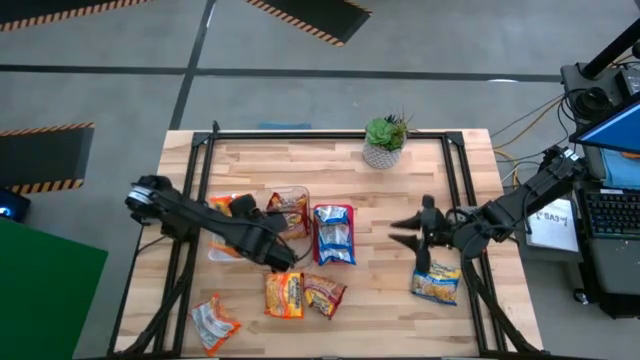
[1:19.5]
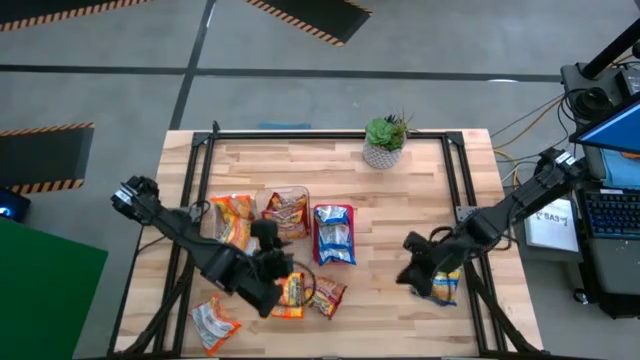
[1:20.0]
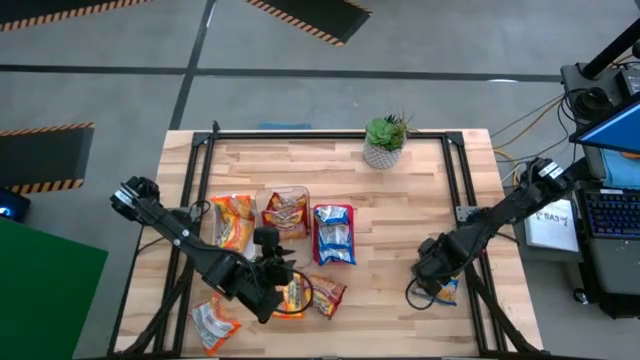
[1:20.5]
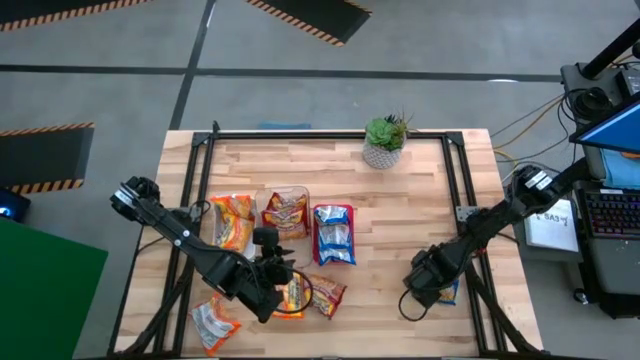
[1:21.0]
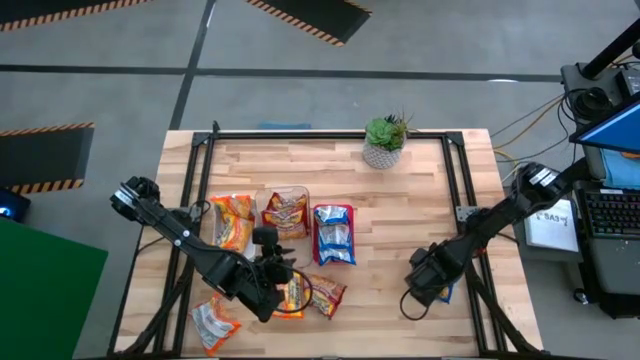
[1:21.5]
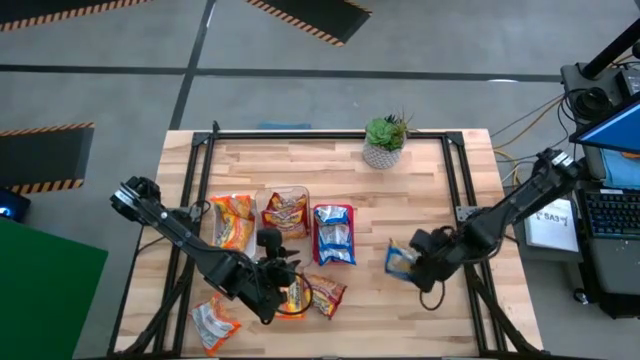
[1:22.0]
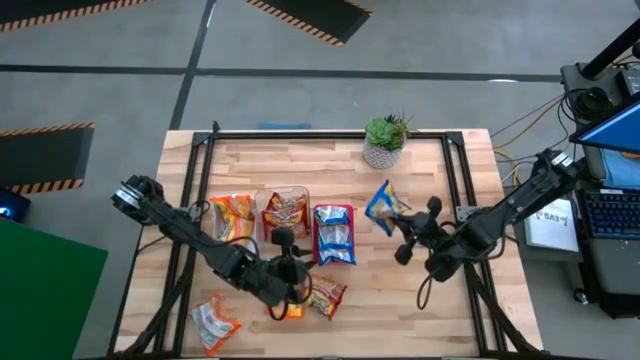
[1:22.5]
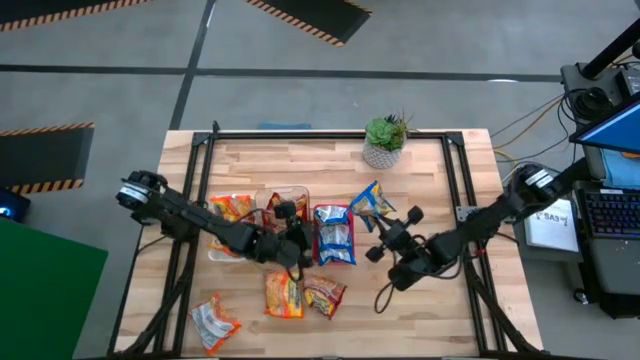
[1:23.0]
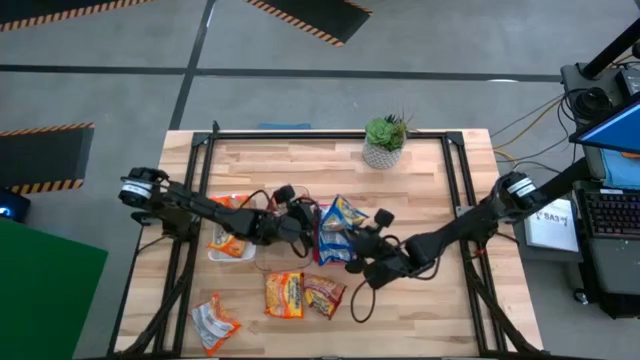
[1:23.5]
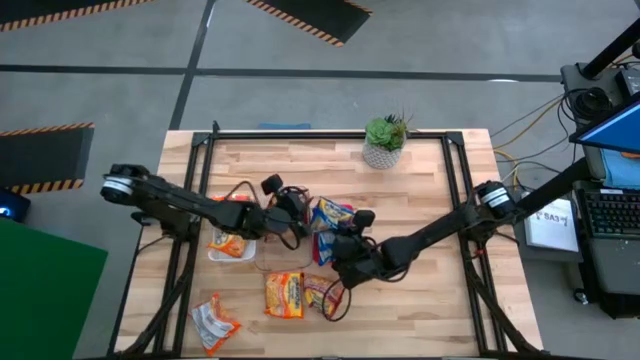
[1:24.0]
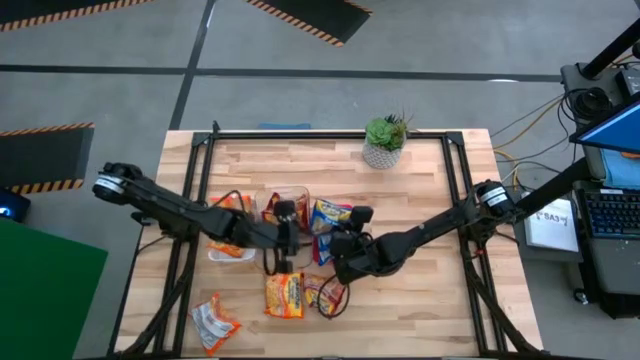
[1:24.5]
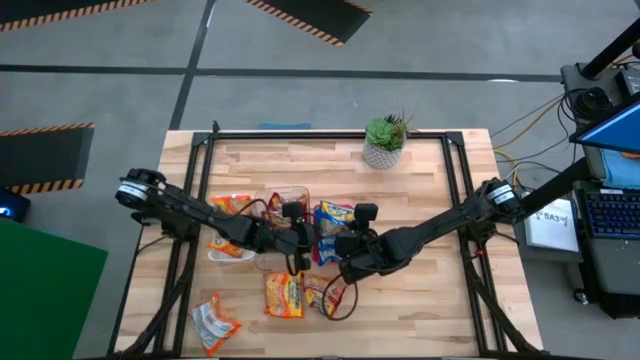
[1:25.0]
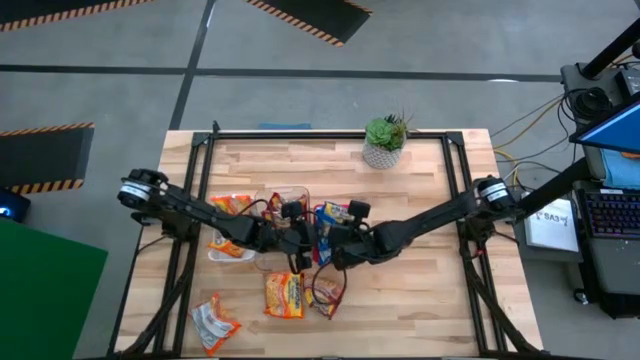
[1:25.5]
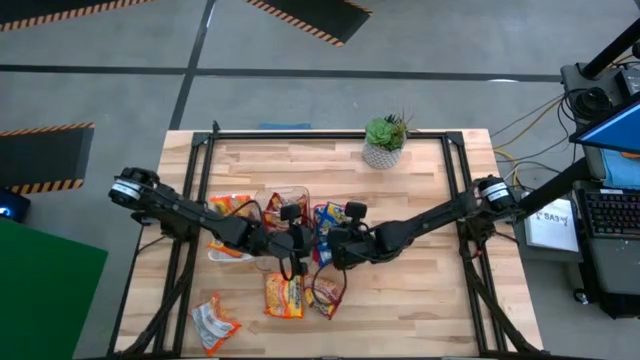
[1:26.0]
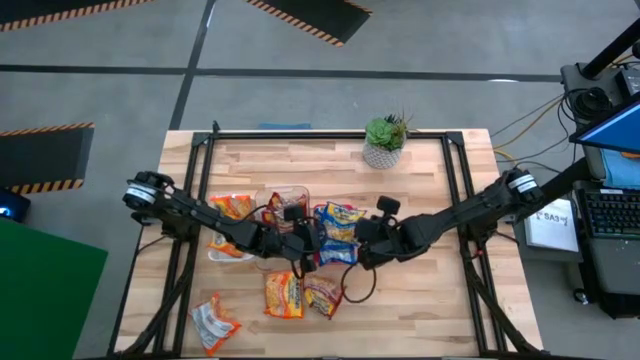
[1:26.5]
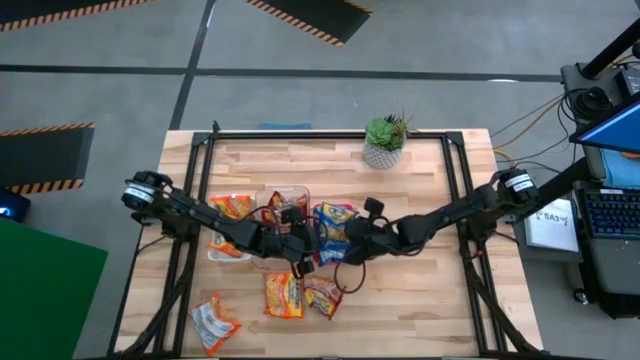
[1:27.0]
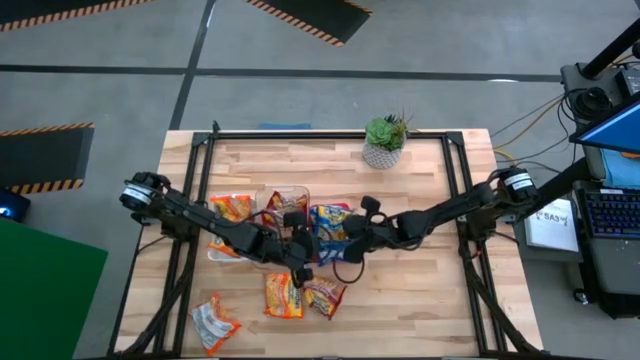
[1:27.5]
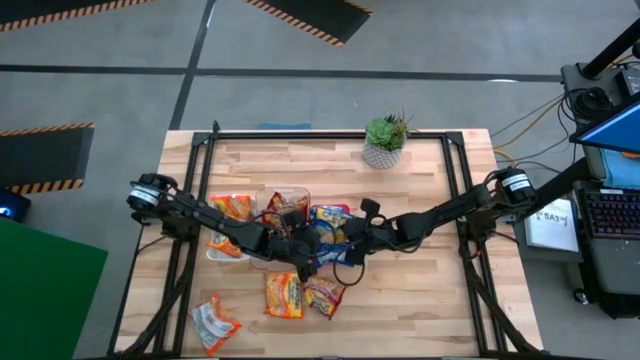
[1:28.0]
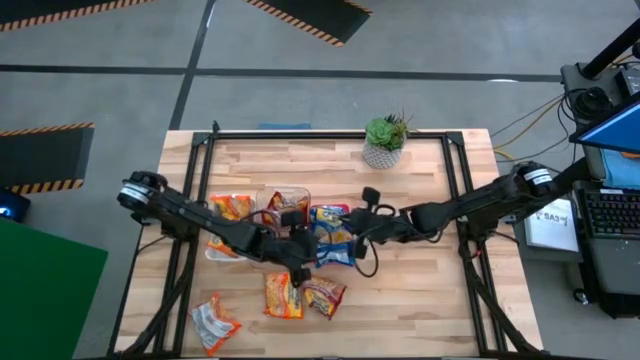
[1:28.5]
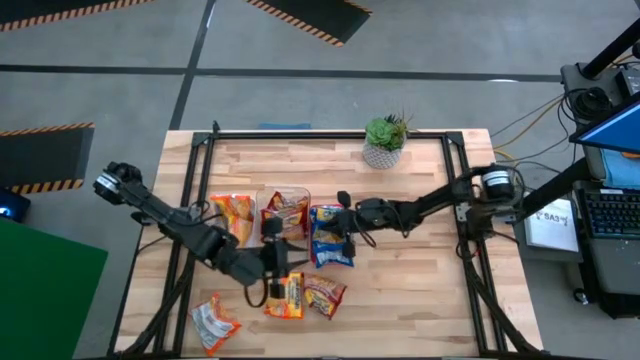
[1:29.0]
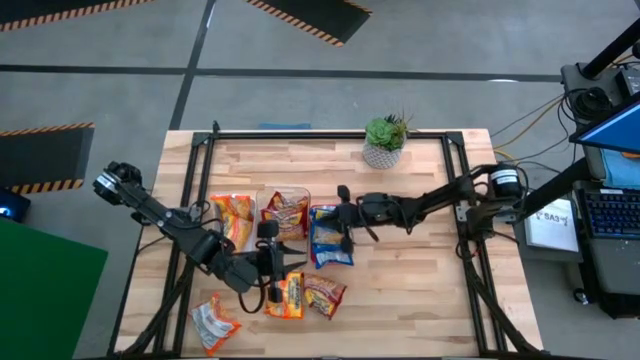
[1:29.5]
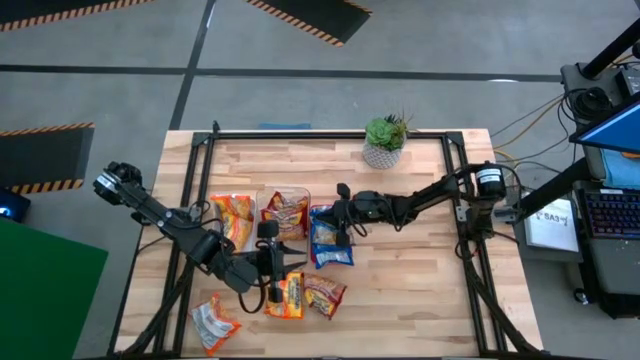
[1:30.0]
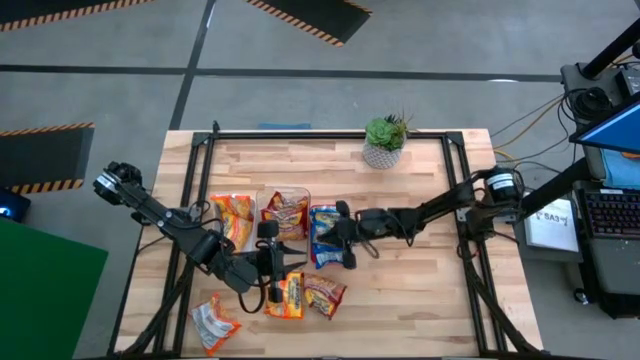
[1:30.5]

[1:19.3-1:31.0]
Task: Sort Maruchan noodles
Put the blue noodle pack into the red bin

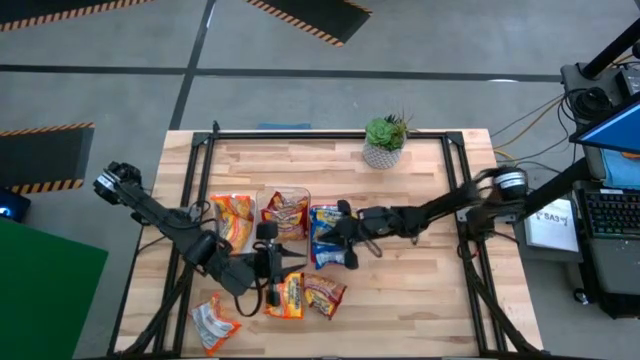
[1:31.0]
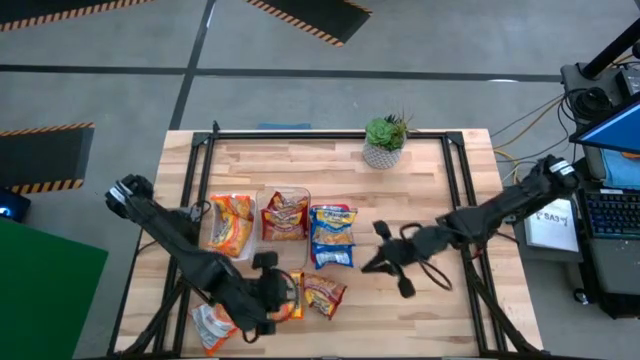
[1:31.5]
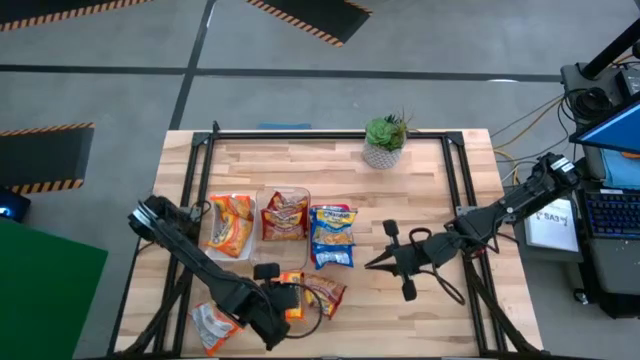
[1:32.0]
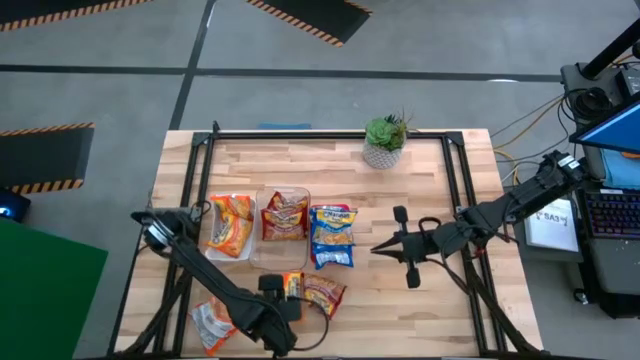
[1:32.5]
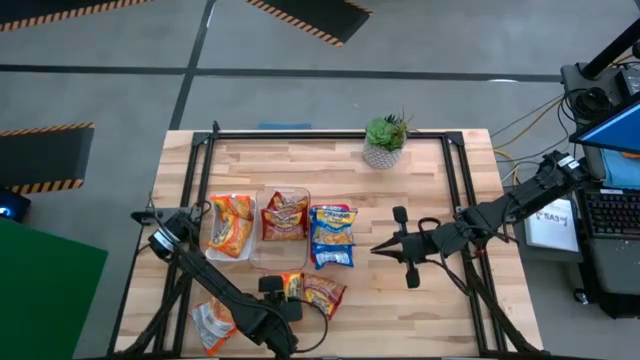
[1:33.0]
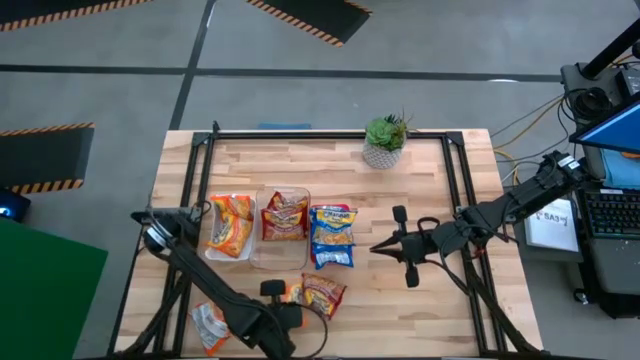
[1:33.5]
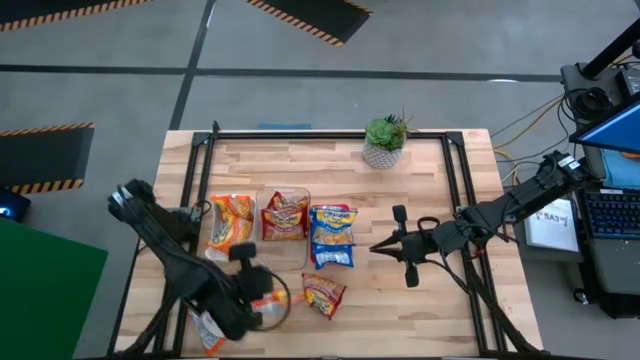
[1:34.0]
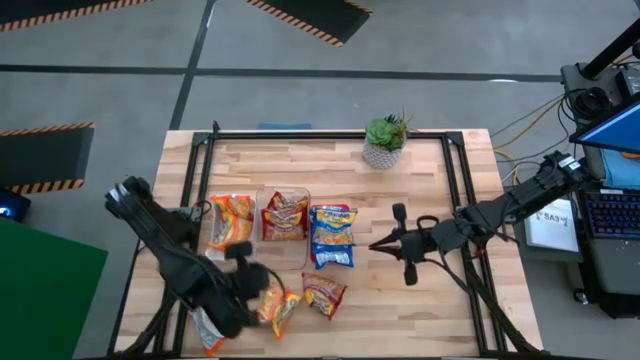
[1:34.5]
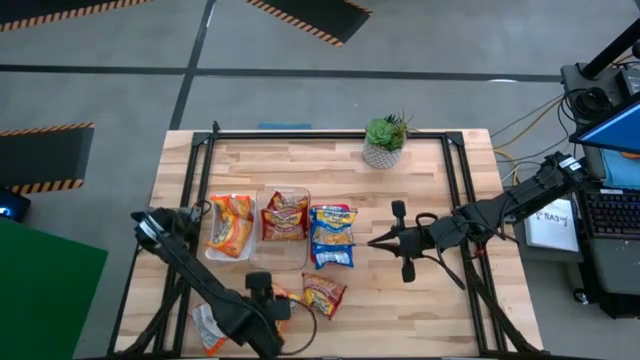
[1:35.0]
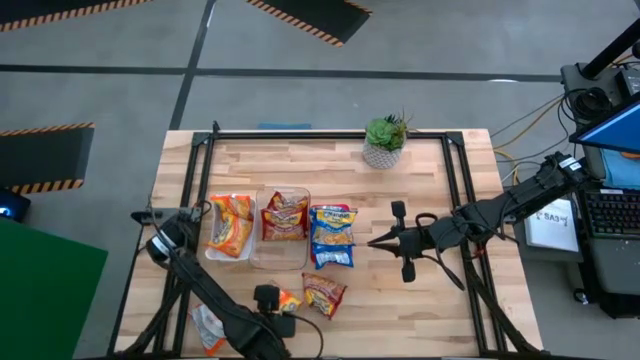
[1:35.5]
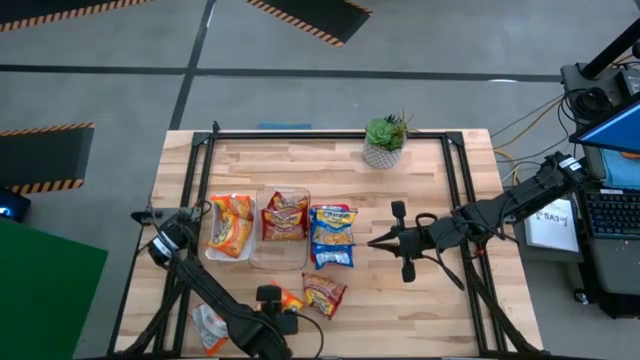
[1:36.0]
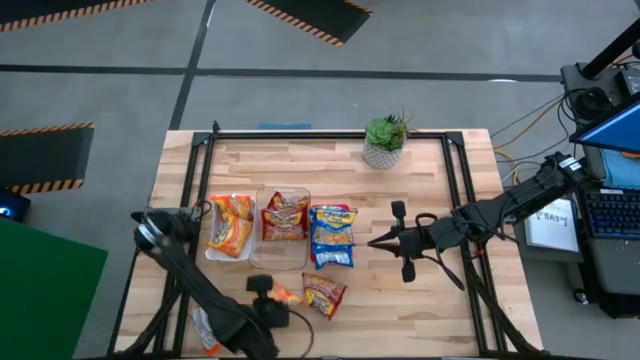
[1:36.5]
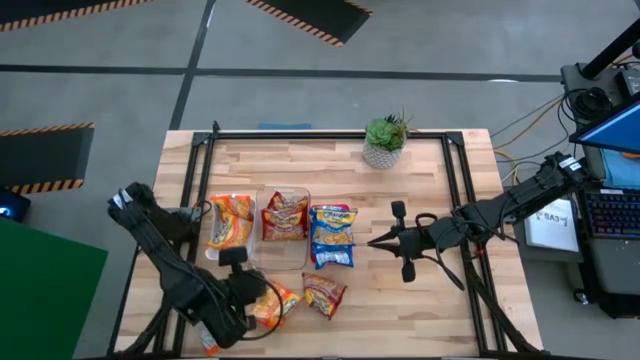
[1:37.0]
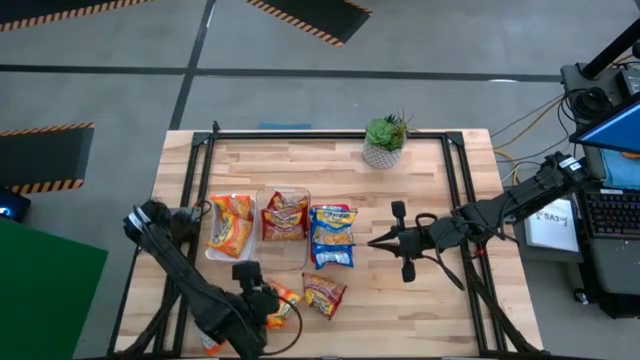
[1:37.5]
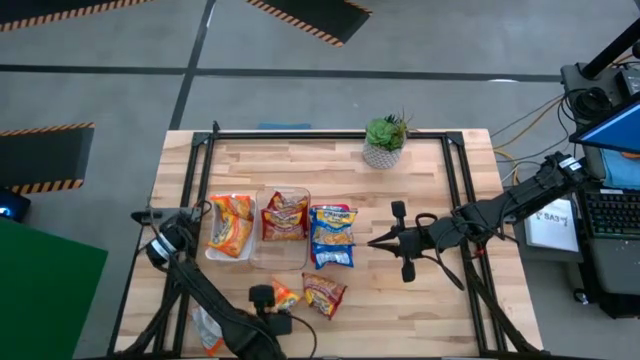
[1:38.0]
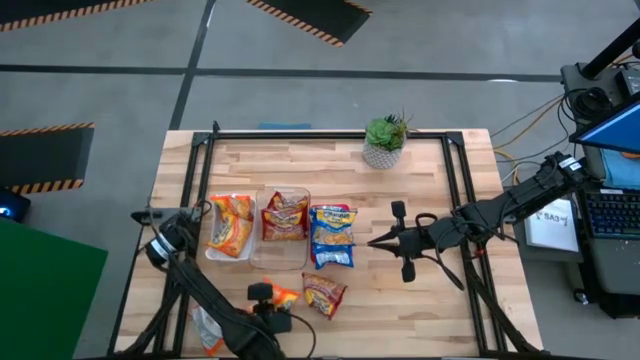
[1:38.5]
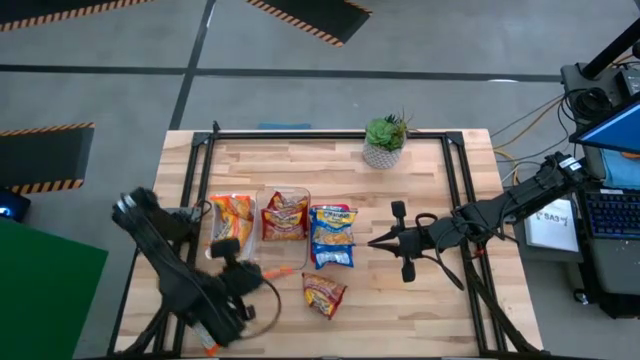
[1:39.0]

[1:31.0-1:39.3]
Put the orange noodle pack into the white bin

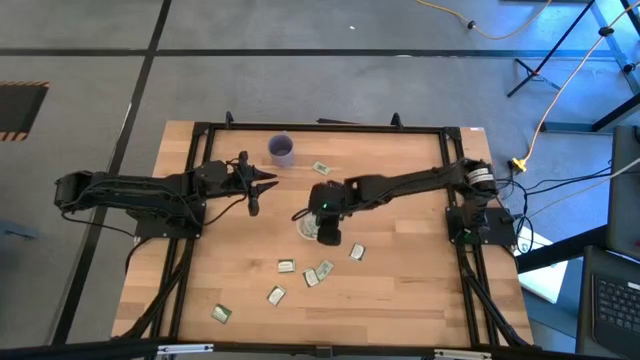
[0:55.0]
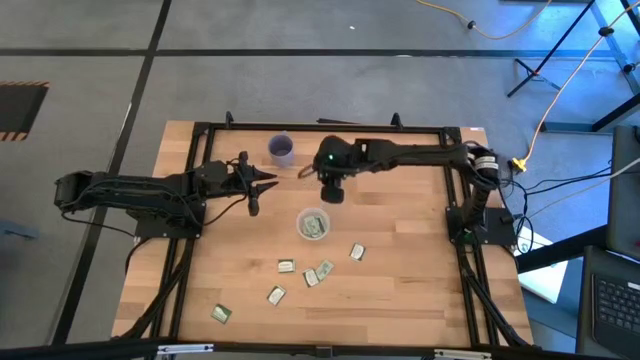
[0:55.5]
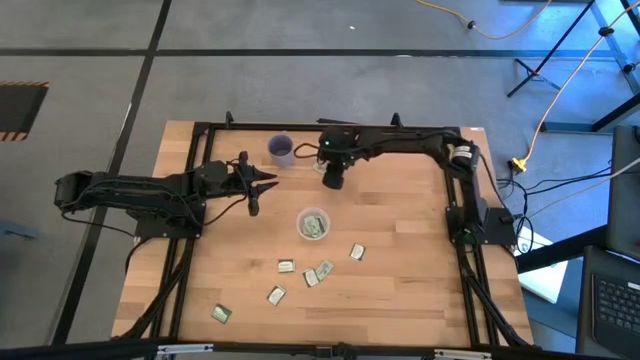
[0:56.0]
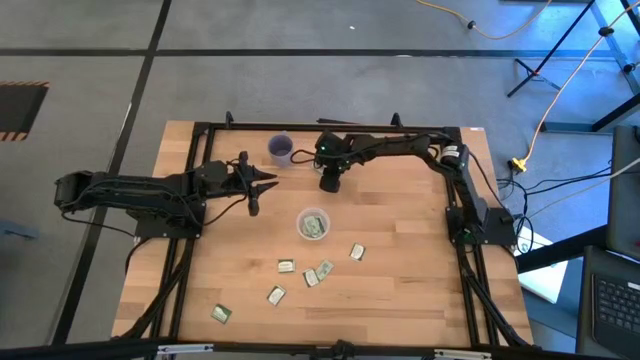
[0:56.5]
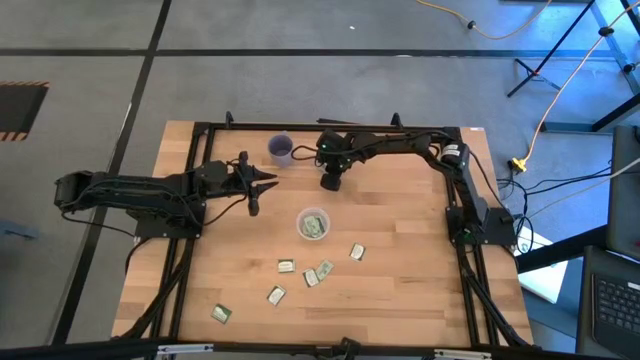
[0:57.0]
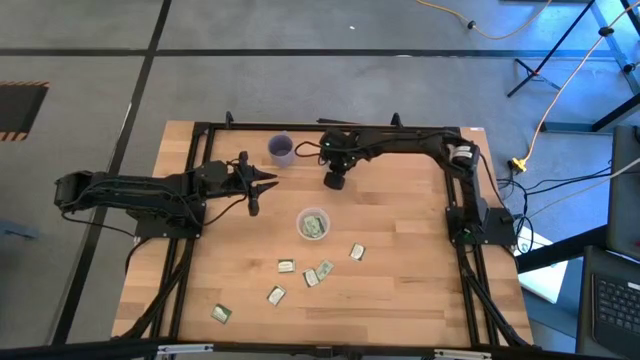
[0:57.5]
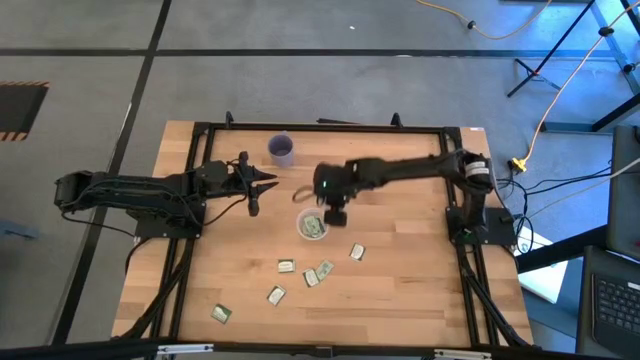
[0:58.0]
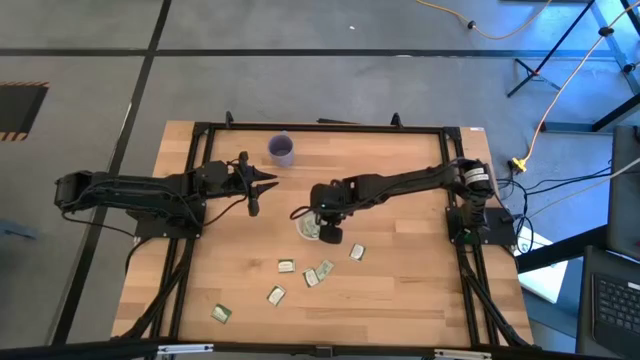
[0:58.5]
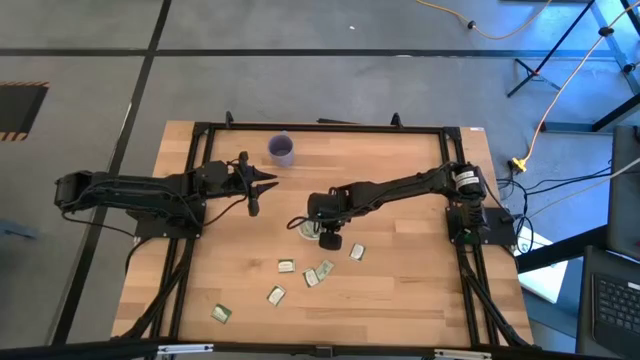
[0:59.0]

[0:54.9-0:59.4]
Task: Pick and place Stevia / Truvia into bins
Put the stevia packet into the transparent container
